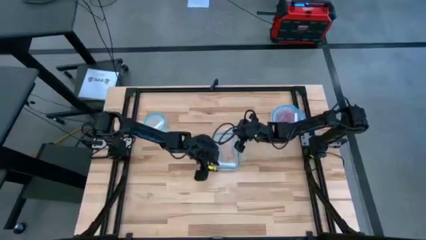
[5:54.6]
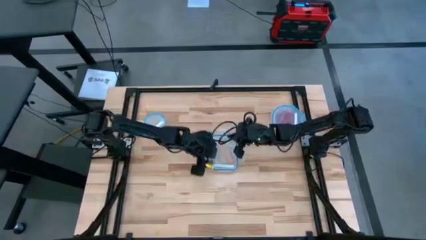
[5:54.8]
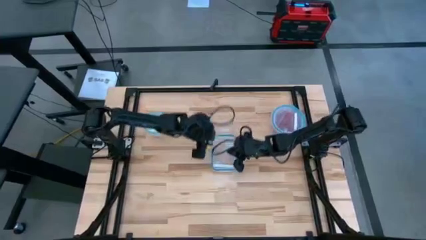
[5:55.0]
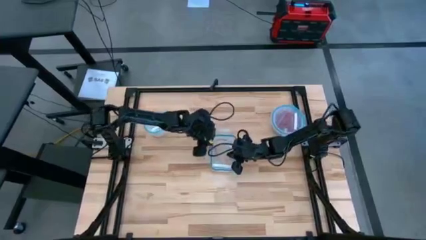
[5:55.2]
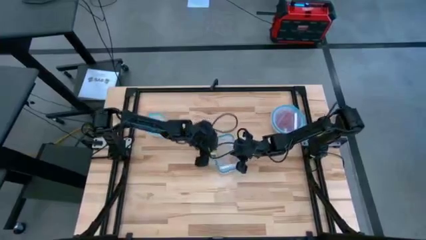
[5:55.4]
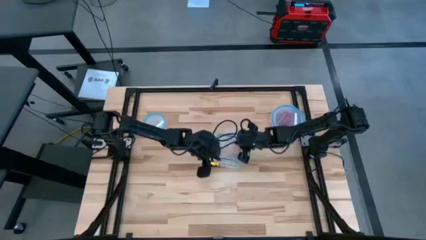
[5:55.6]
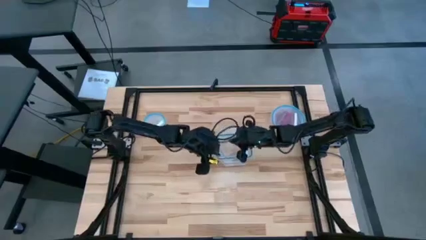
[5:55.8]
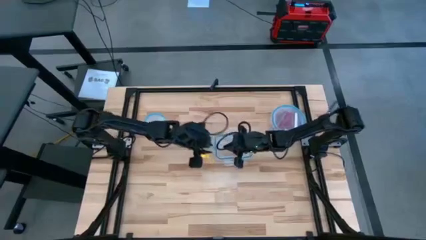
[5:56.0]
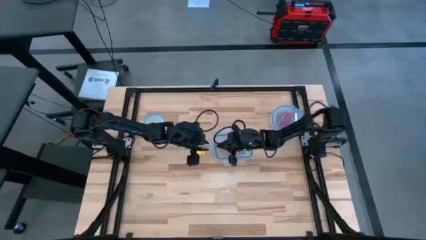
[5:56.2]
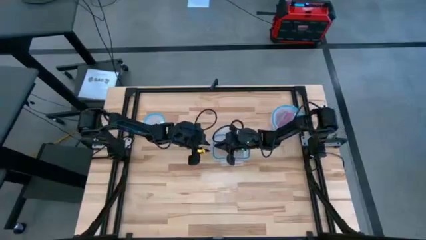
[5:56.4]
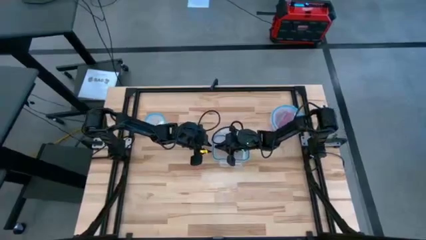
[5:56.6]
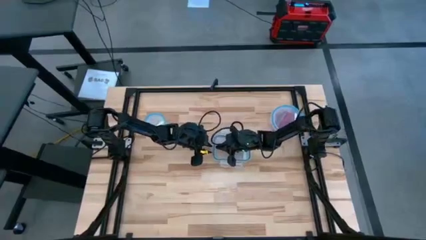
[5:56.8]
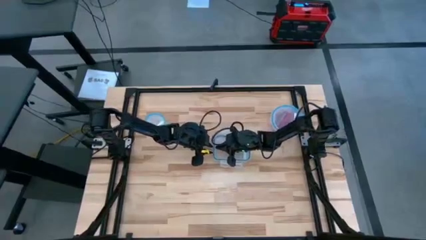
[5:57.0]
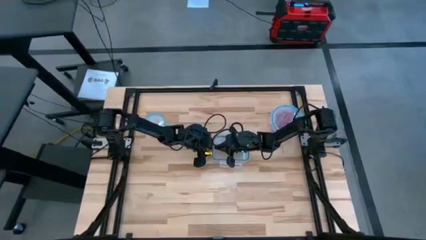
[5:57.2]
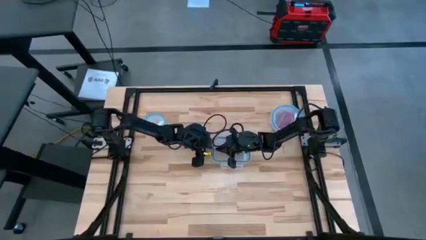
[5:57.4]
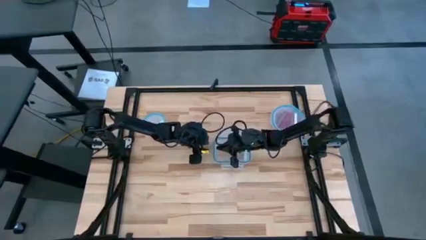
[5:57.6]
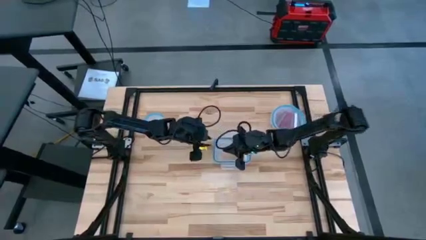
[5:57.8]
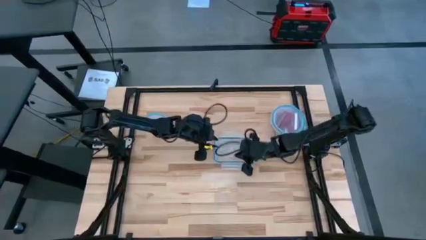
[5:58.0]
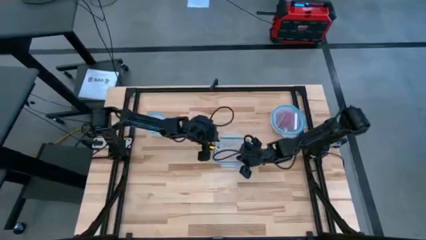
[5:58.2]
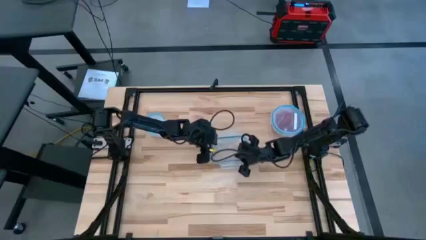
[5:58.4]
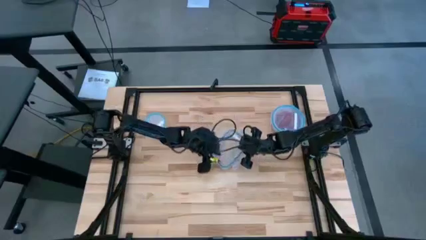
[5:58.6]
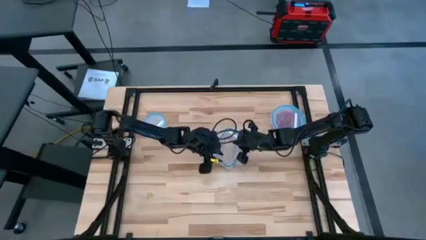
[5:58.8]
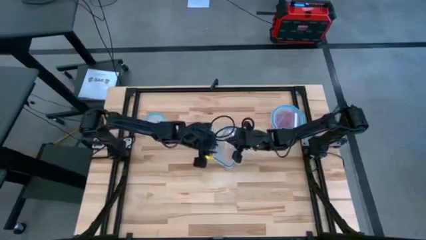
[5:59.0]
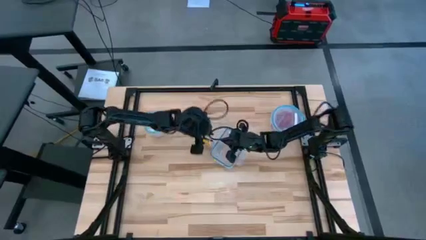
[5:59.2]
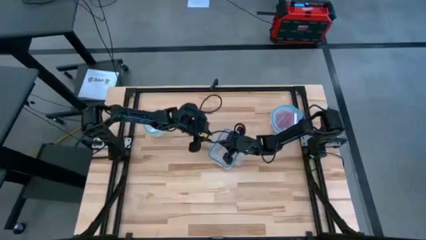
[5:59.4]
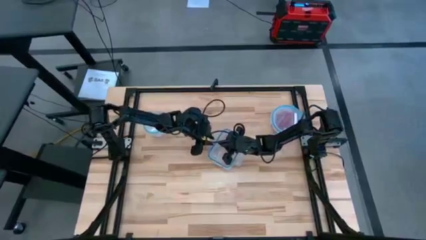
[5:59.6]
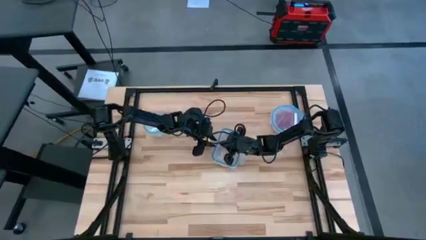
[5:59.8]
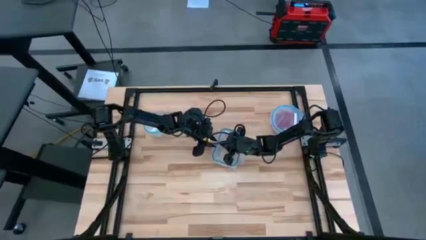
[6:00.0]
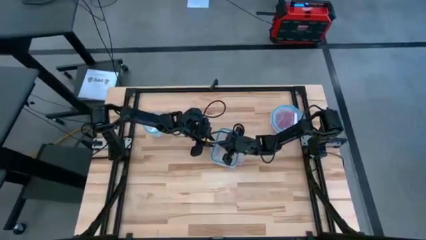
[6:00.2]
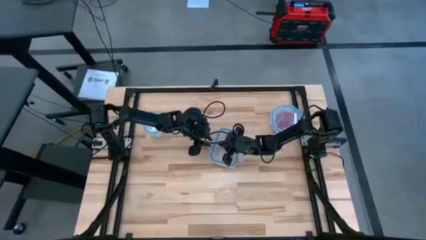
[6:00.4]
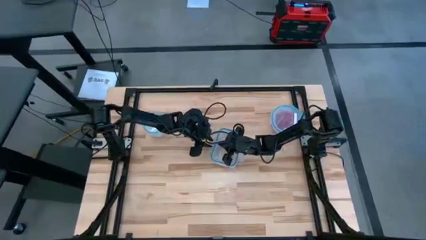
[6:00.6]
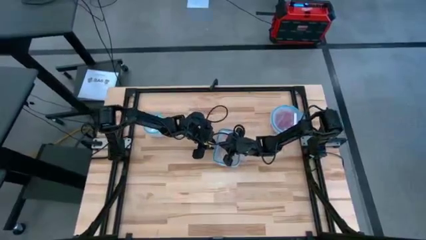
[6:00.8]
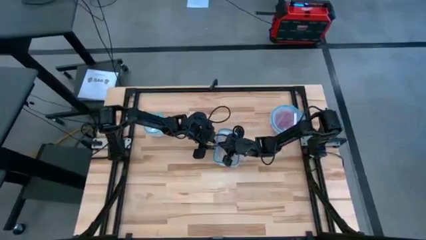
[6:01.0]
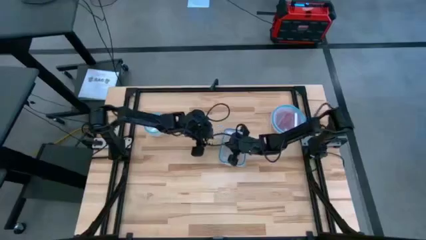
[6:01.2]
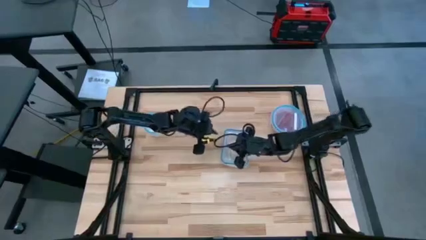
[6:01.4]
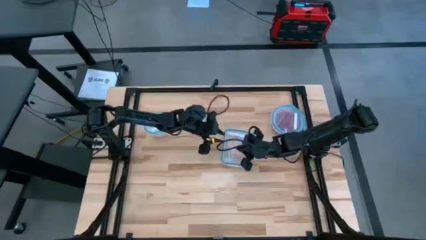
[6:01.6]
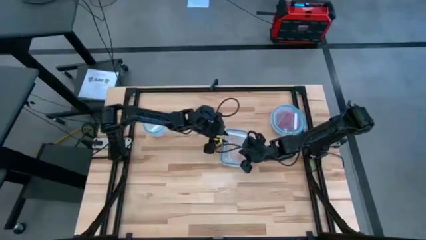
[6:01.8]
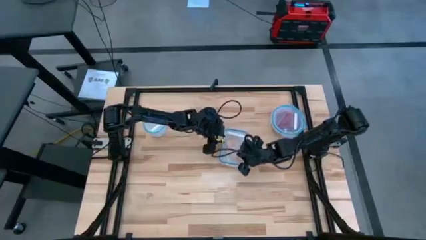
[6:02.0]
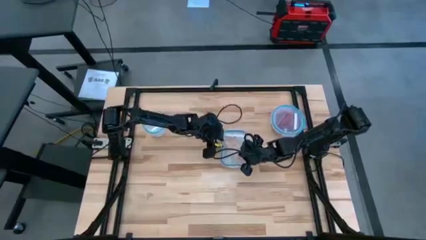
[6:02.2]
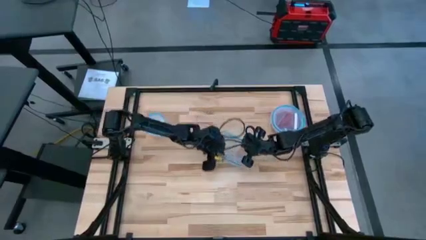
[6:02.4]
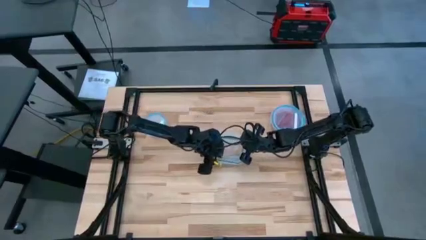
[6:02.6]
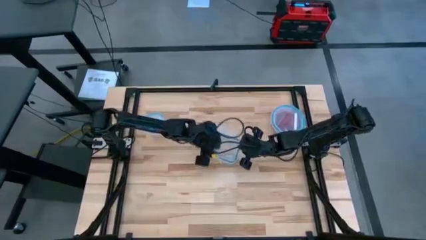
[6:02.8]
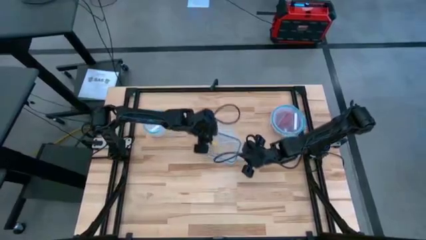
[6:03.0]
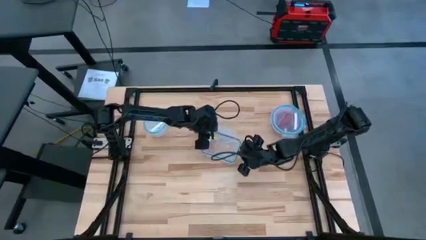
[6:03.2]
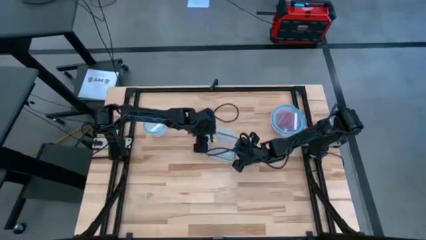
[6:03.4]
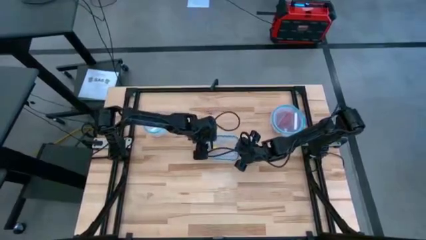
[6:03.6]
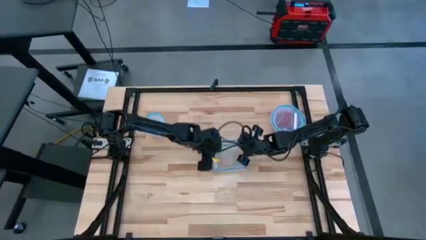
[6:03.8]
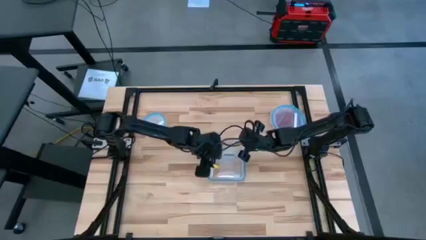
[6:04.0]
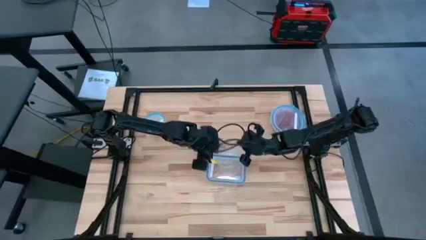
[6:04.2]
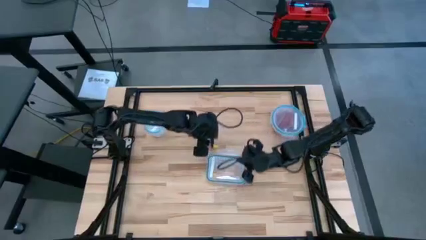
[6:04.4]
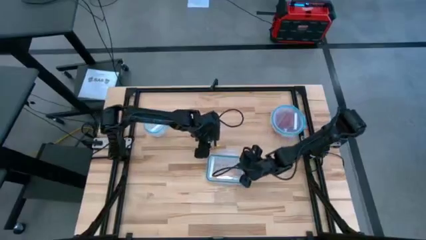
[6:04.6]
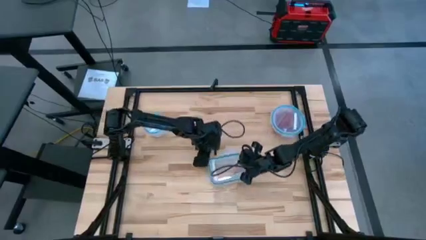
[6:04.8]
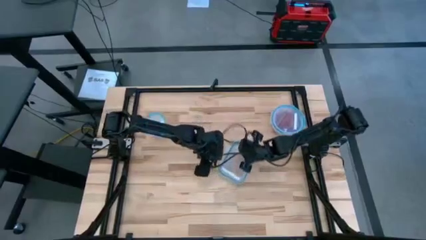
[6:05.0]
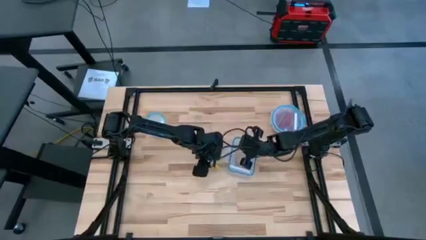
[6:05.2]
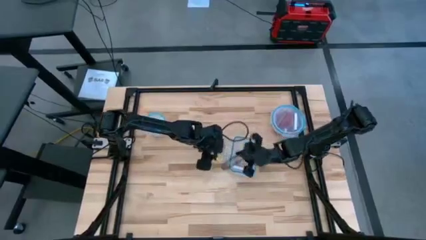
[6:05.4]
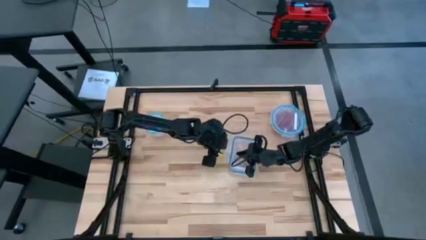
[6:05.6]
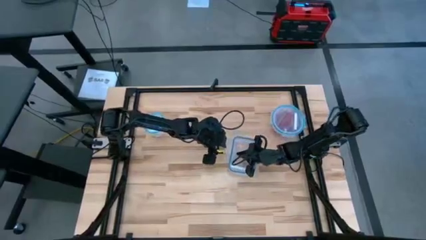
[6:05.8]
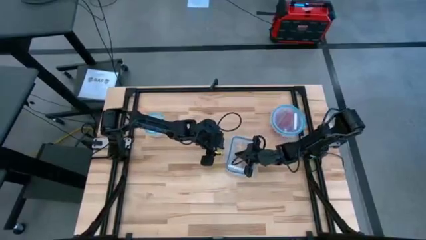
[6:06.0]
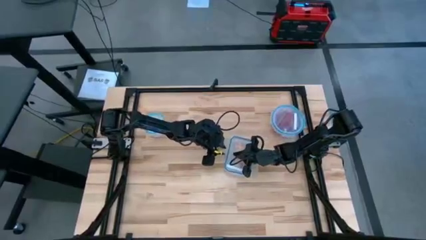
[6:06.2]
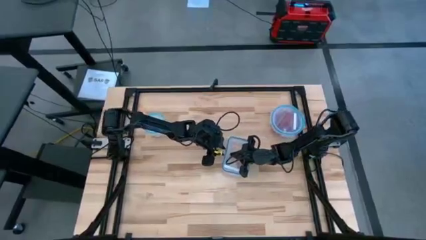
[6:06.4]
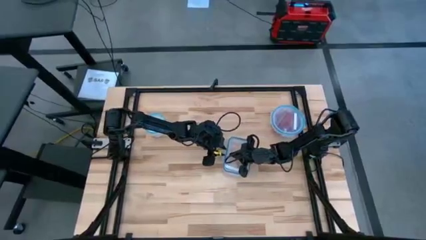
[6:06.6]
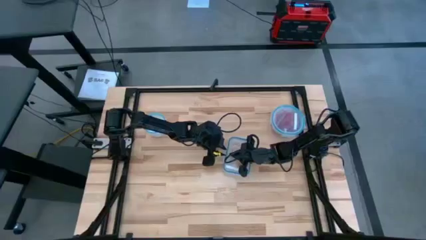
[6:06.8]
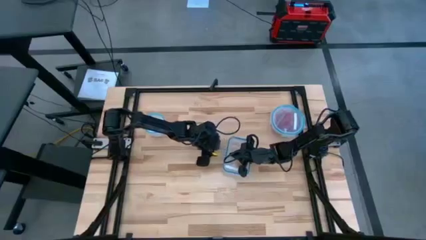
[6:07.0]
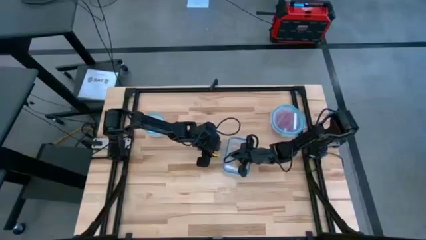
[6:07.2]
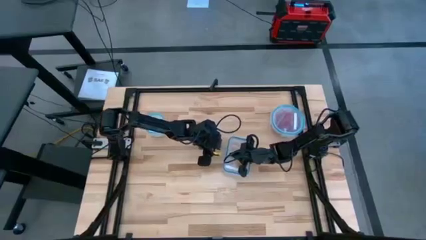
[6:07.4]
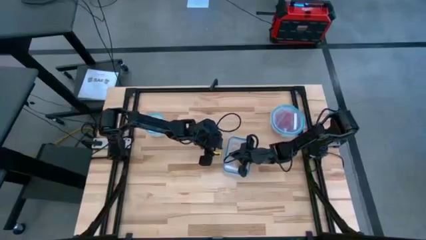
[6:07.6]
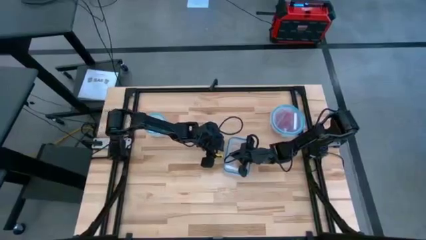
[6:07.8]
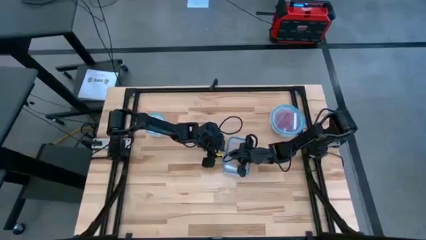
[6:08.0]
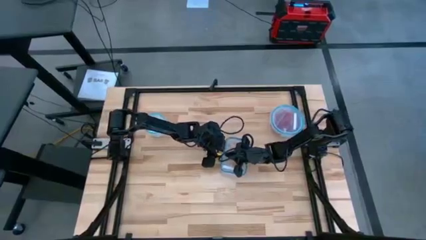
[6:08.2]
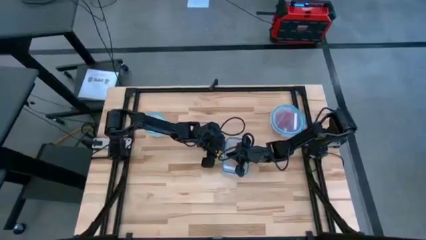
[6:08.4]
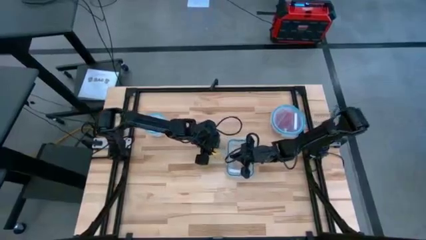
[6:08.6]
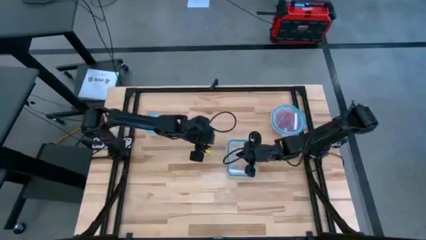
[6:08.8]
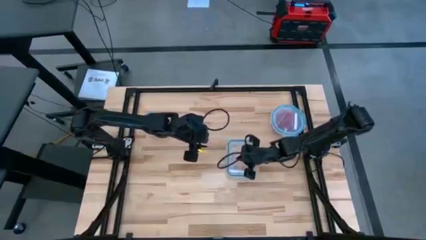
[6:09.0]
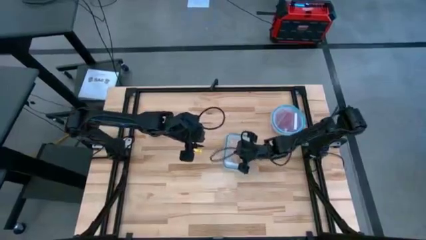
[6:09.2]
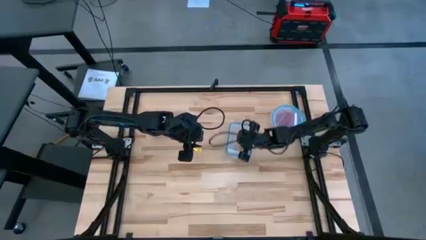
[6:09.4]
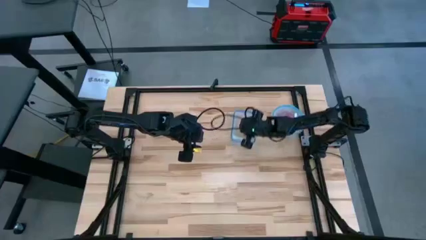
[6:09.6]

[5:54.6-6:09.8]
Task: Sort candy
Close the rectangular transparent bin
